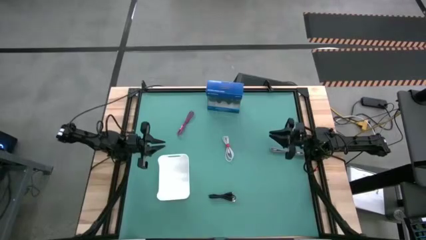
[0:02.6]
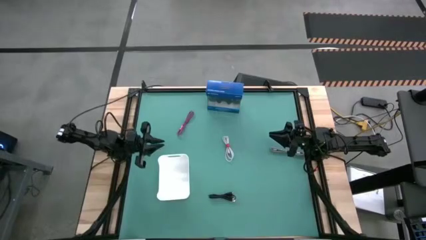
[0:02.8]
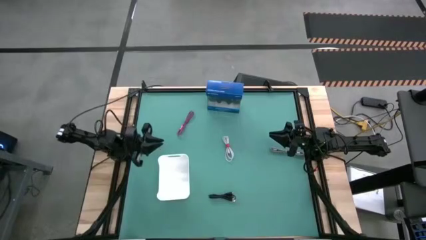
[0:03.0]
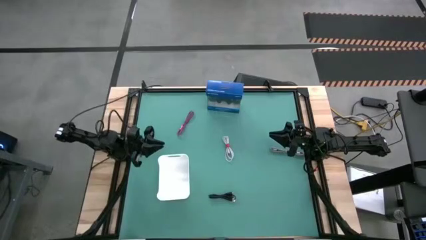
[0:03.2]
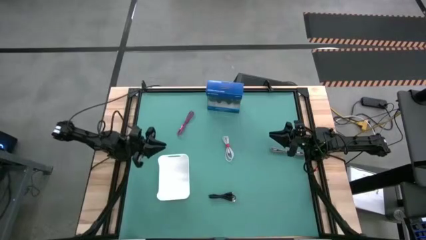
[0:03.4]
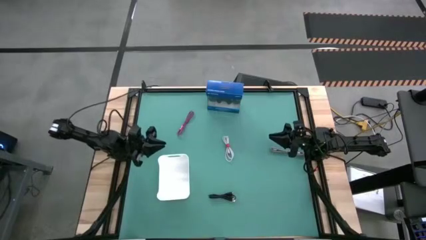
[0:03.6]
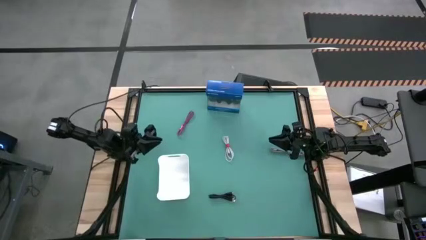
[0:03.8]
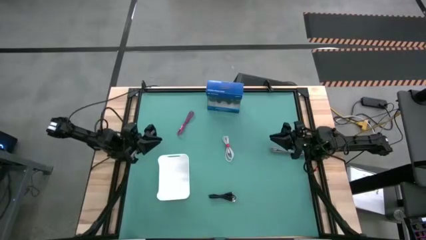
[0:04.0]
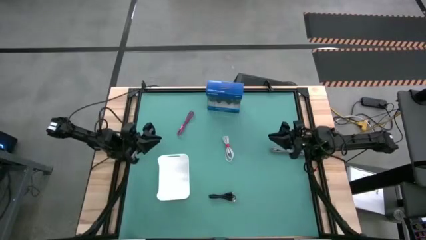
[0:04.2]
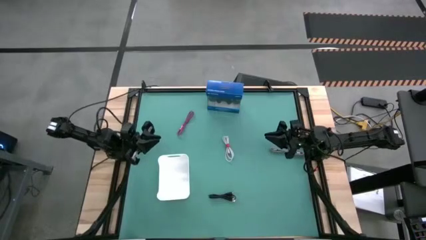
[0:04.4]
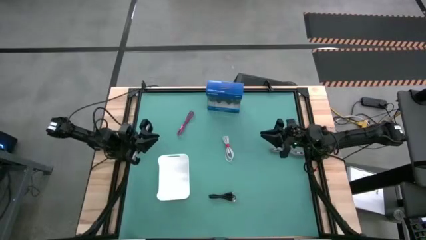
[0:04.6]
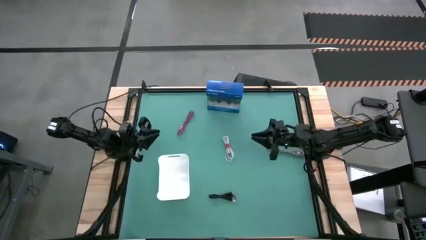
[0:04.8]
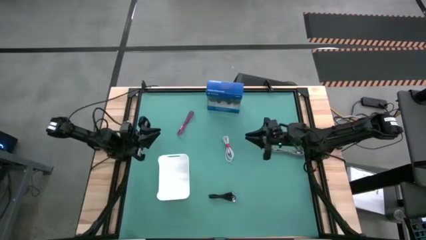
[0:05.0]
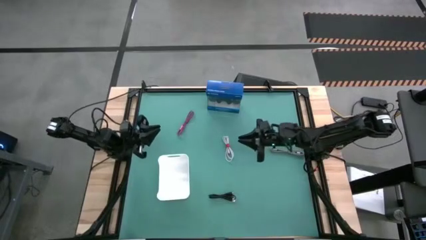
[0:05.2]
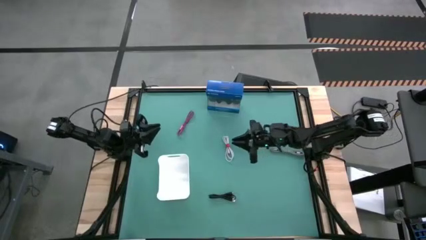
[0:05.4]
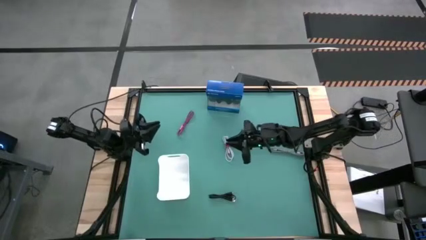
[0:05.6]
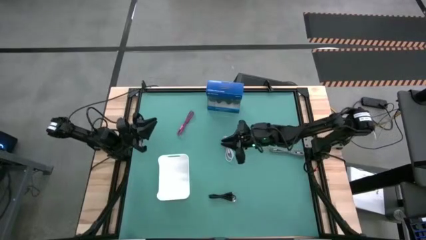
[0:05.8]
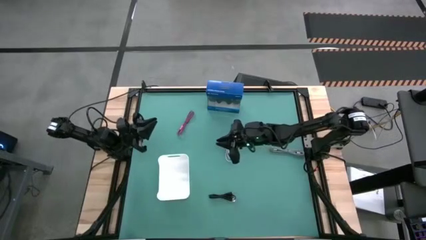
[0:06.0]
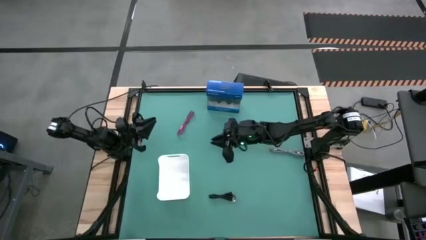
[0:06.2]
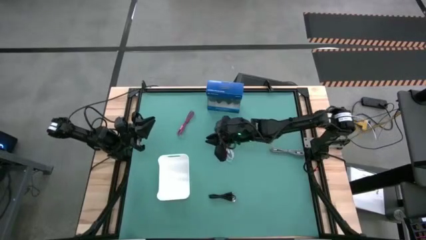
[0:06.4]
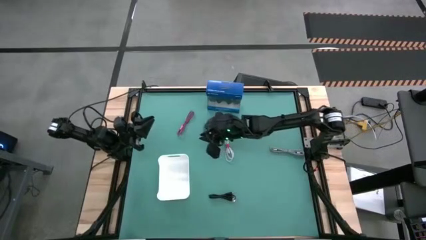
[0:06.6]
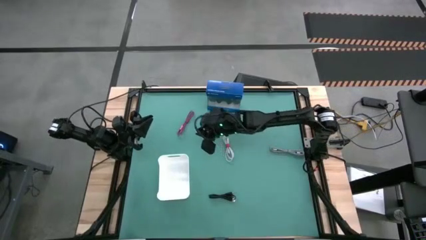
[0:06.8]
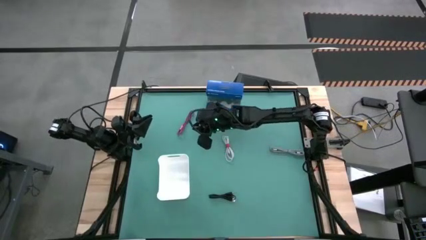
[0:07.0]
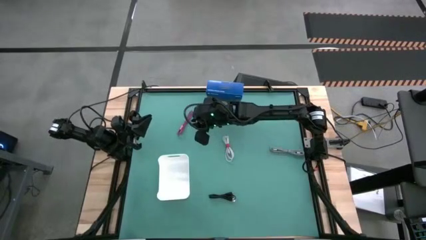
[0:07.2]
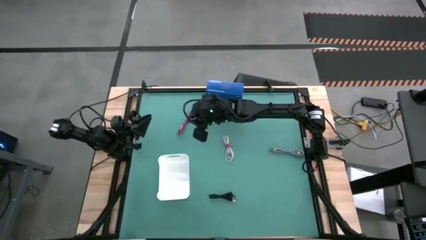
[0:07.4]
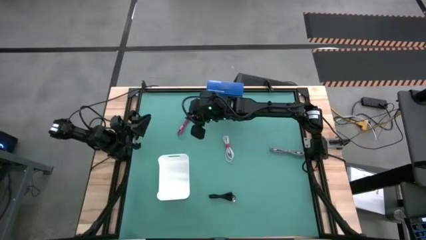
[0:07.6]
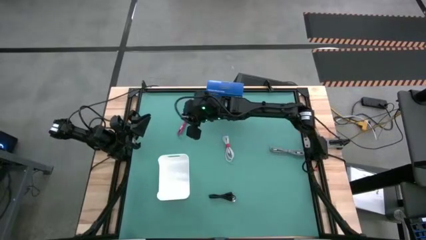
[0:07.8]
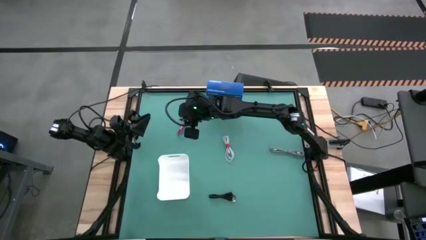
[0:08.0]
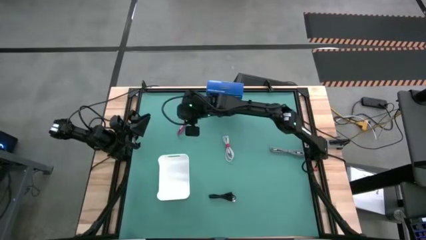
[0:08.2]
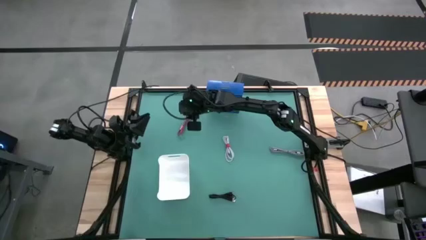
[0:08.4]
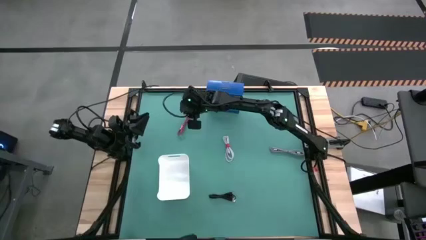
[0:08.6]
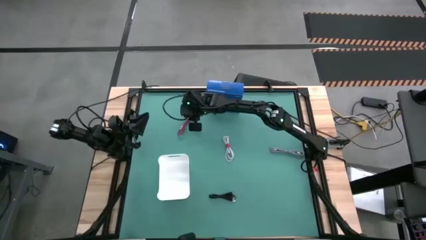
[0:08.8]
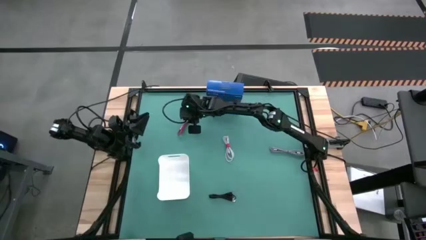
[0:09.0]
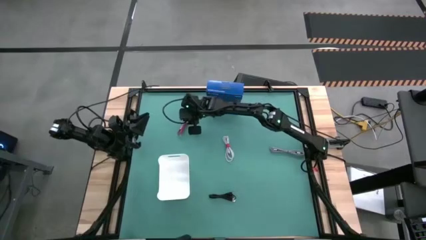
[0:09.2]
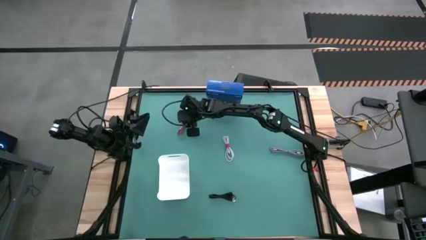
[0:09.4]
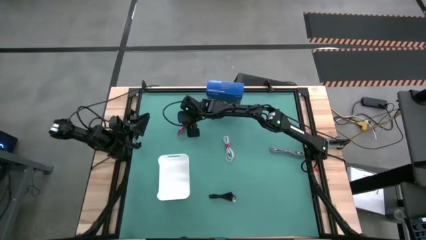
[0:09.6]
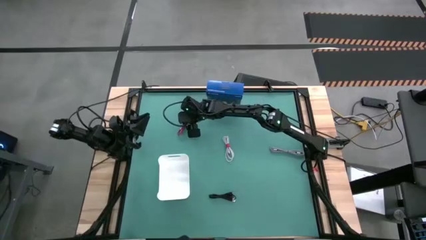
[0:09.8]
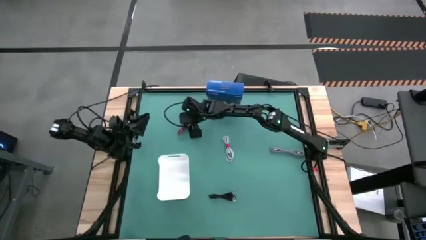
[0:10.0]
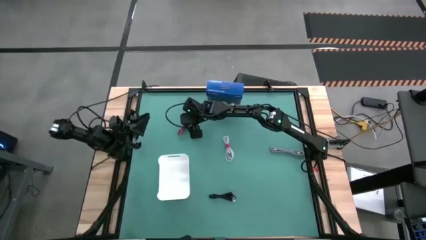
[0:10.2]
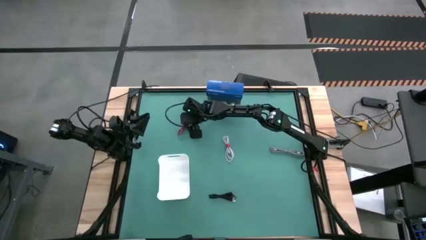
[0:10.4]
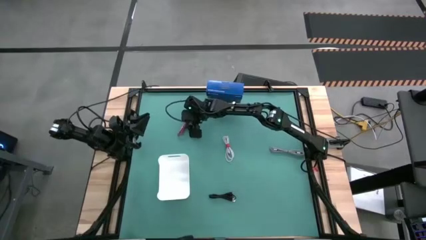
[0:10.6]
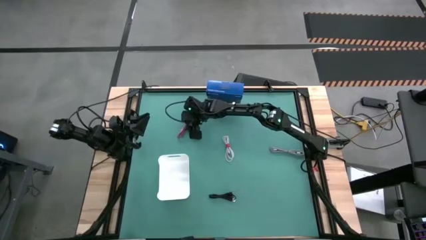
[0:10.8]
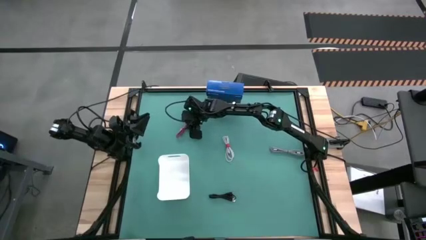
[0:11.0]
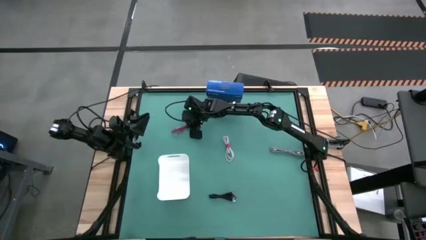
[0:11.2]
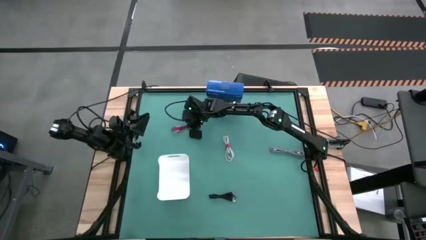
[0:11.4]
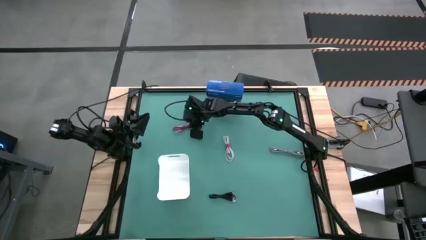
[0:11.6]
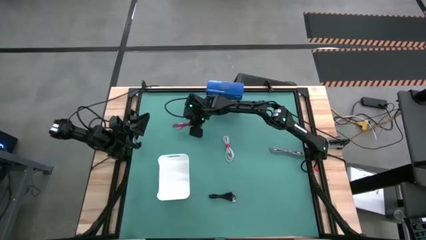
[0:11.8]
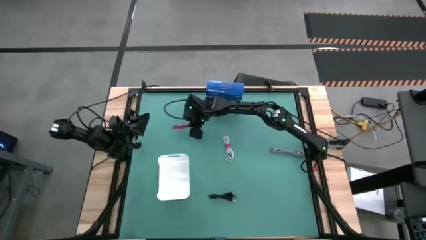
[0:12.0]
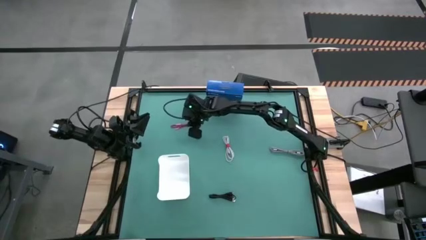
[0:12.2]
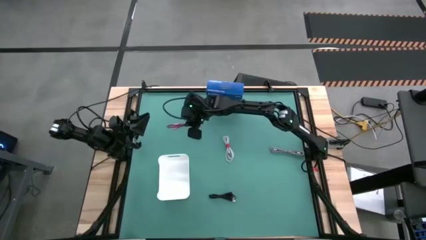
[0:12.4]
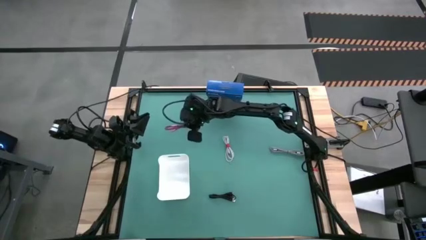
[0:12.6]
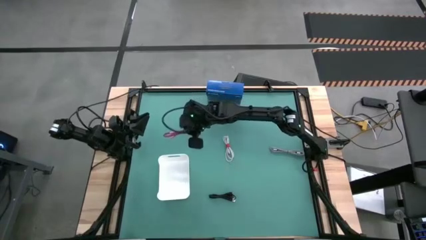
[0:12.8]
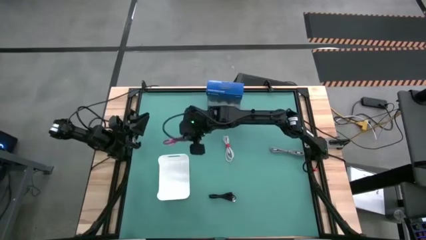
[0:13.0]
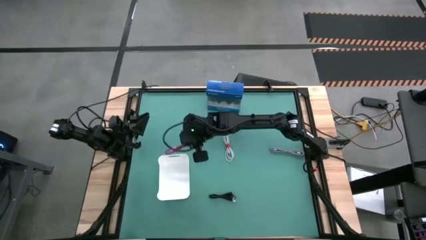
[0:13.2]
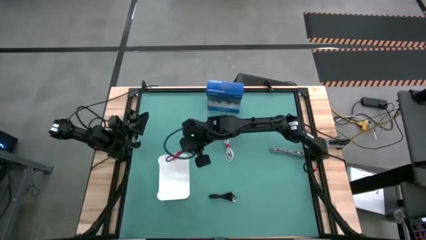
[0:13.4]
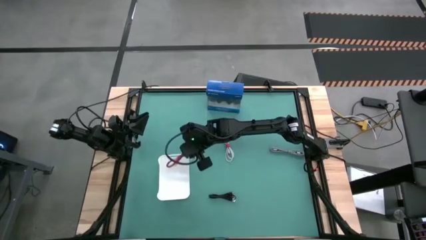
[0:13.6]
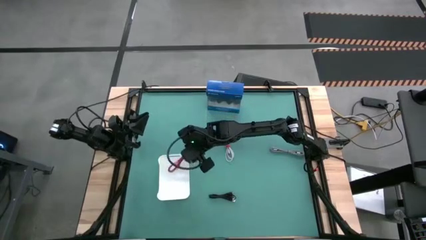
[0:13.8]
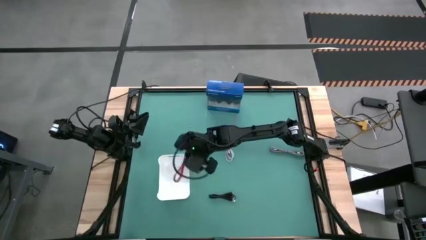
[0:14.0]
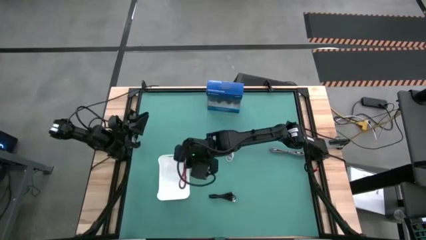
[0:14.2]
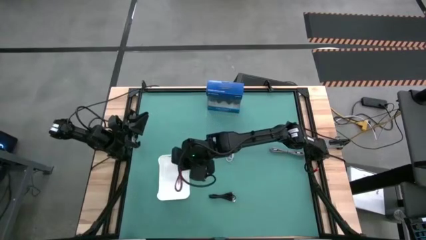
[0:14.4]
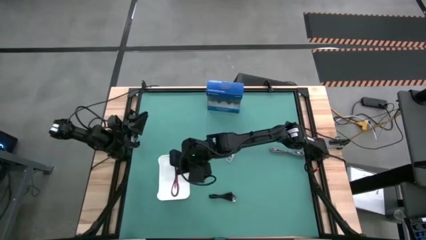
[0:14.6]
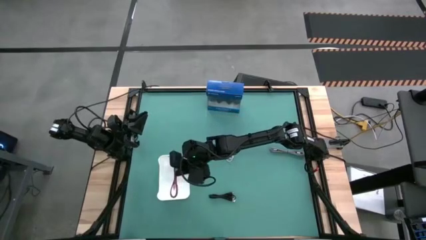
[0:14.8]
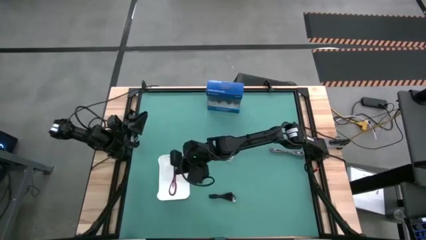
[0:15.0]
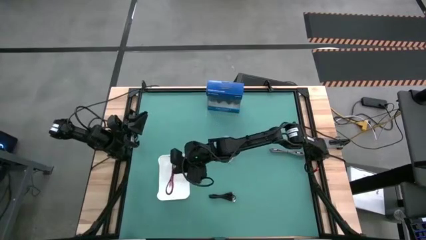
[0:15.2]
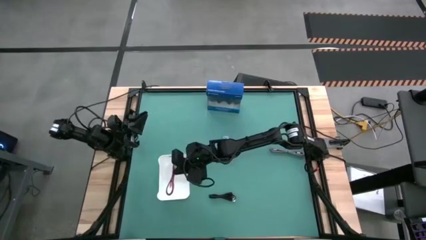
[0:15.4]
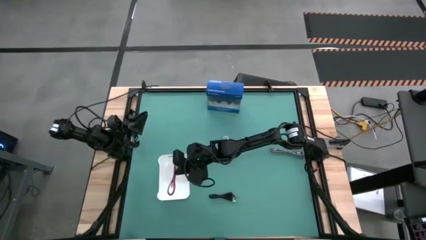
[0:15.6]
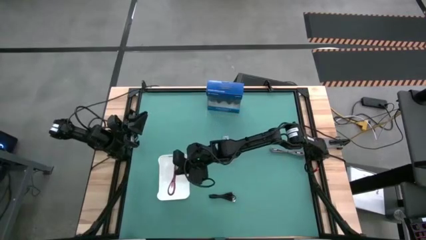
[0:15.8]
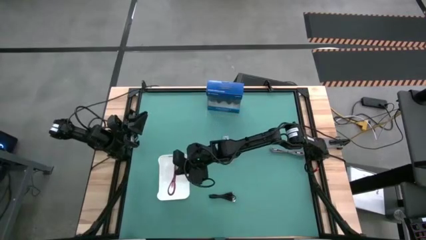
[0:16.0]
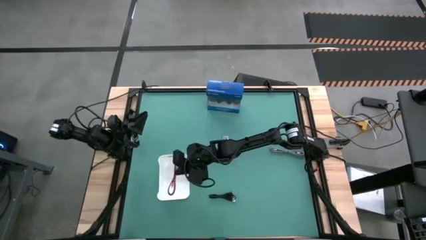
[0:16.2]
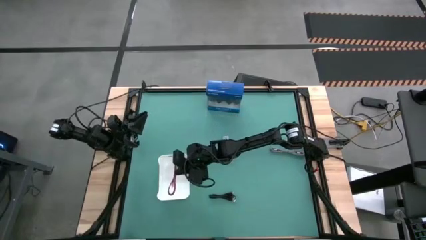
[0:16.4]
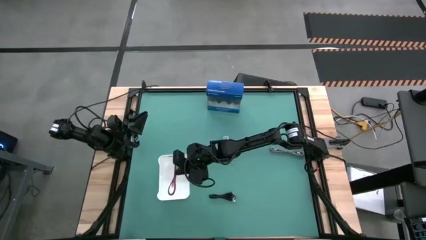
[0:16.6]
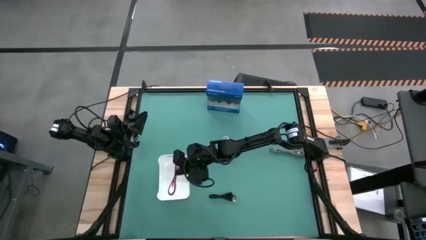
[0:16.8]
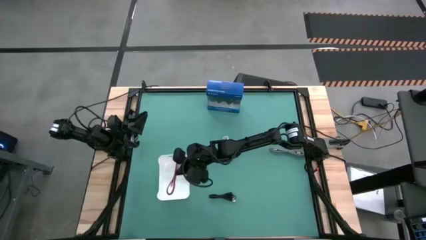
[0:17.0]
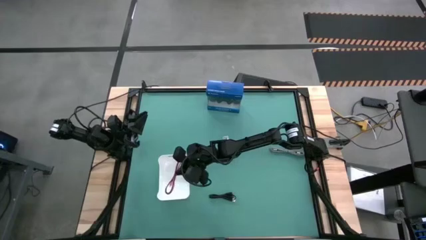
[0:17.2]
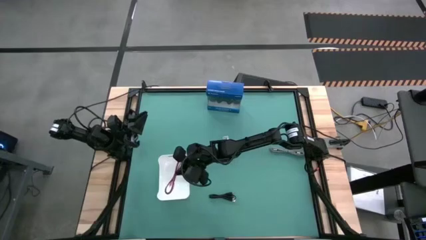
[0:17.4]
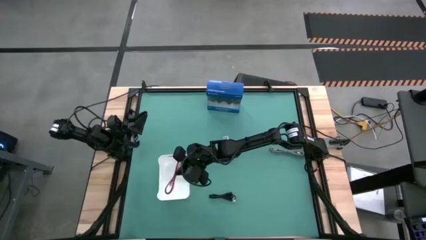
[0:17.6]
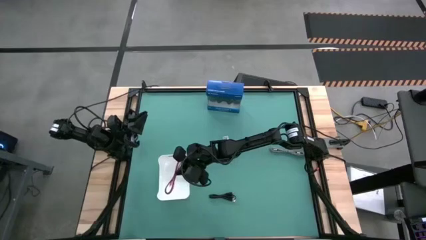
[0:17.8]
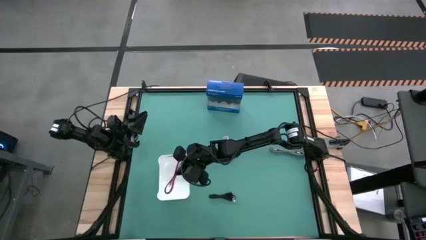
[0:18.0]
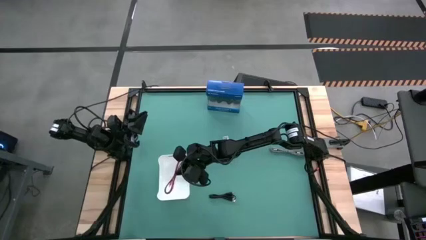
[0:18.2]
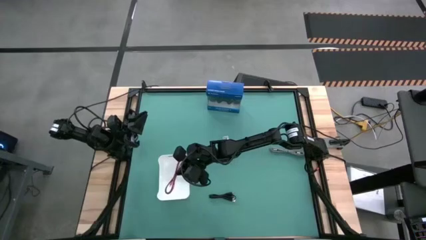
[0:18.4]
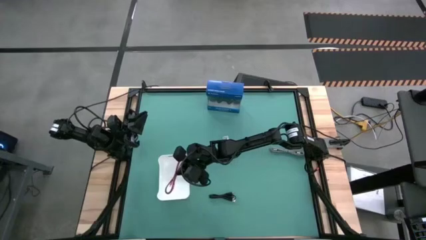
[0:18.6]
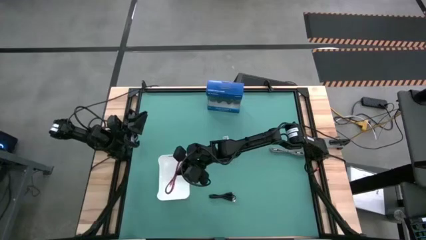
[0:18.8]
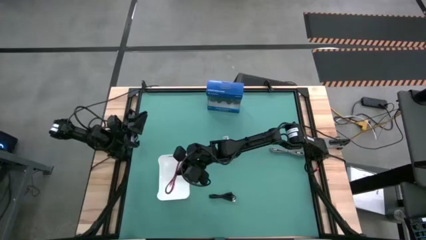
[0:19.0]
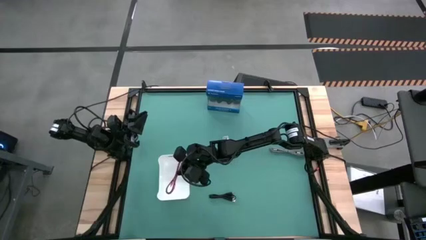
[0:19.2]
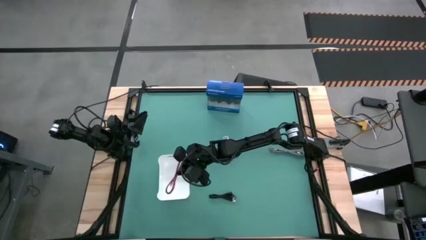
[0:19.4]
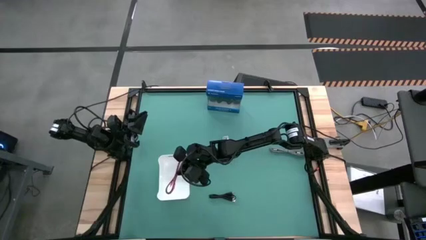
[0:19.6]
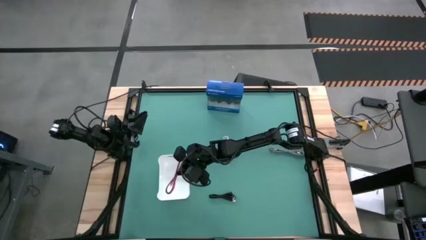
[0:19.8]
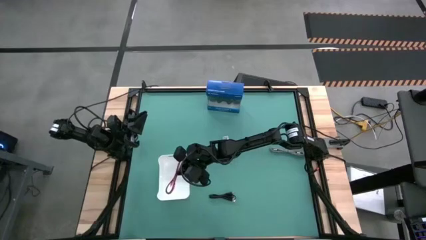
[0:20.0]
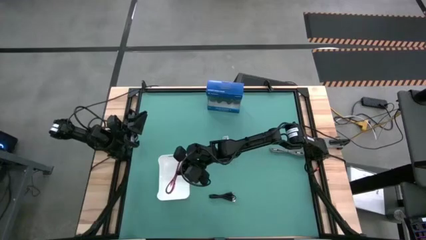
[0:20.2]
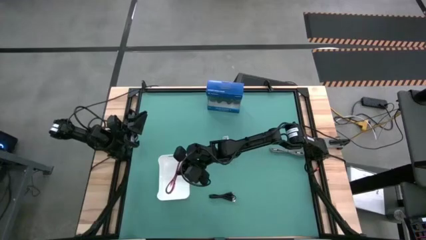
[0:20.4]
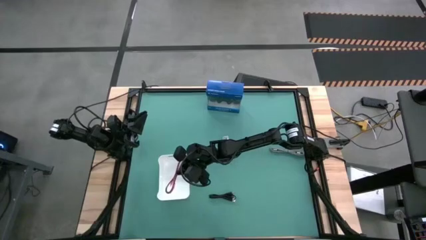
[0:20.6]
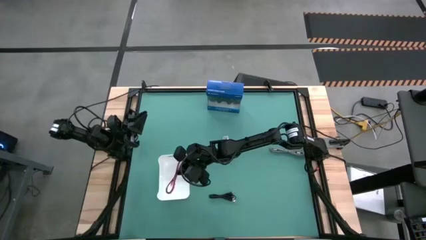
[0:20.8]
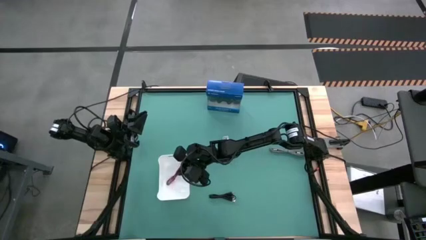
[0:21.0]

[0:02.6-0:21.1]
Task: Pick and place USB-C Cables
Put the pink charger cable into the white bin
